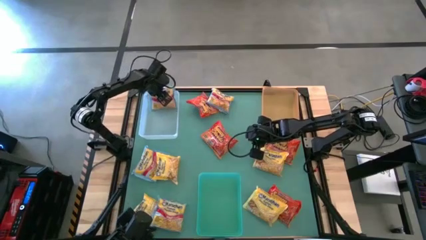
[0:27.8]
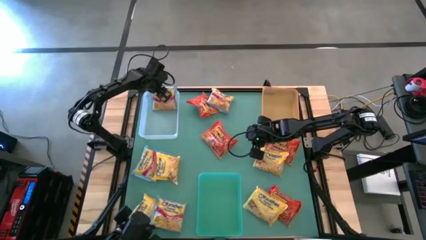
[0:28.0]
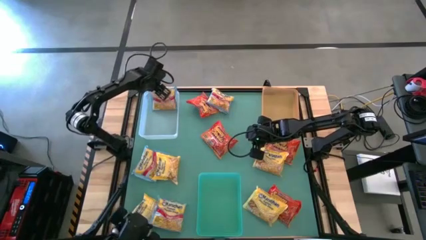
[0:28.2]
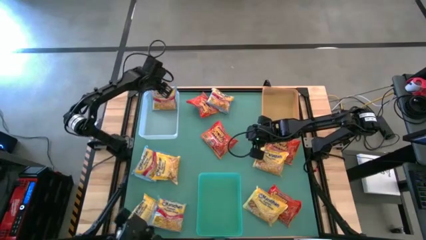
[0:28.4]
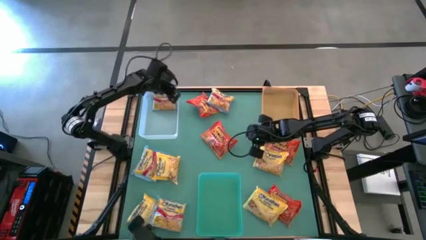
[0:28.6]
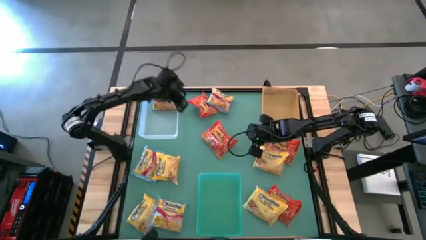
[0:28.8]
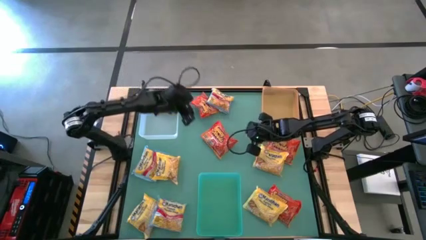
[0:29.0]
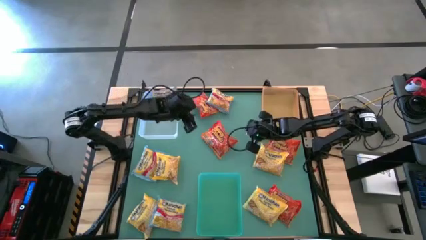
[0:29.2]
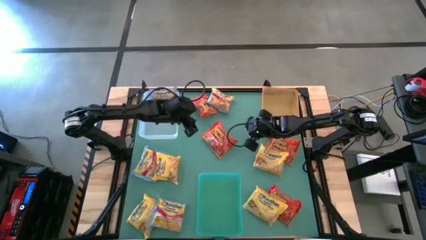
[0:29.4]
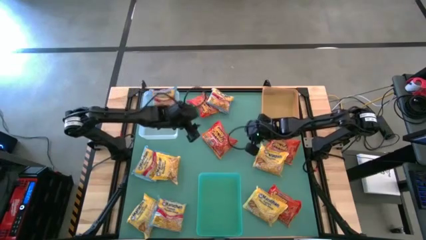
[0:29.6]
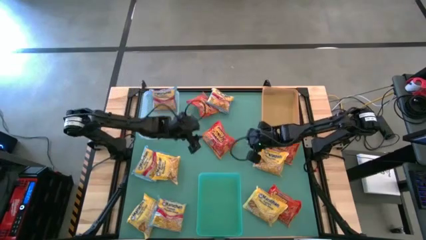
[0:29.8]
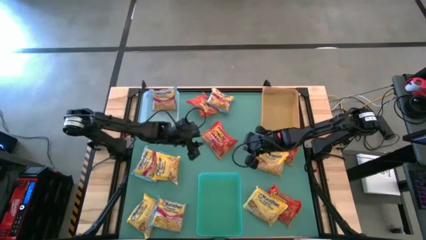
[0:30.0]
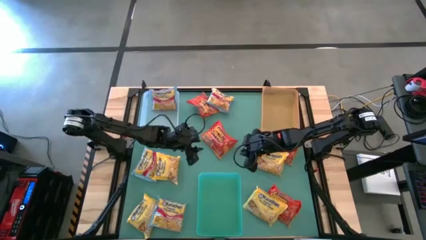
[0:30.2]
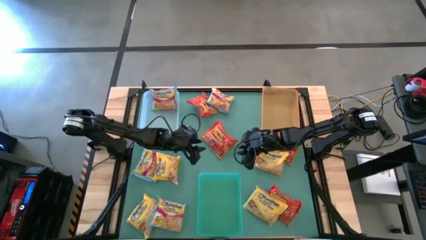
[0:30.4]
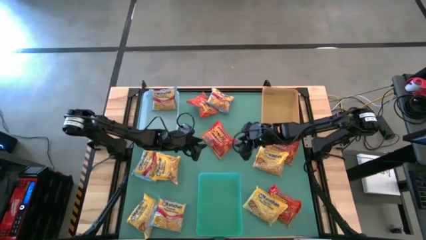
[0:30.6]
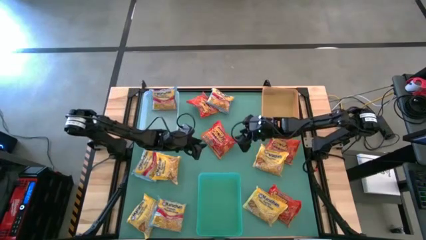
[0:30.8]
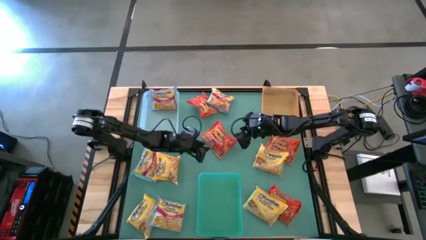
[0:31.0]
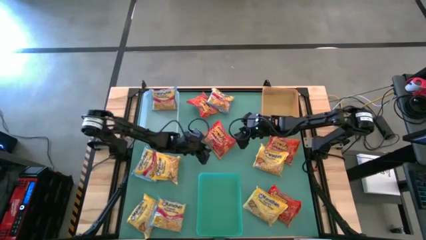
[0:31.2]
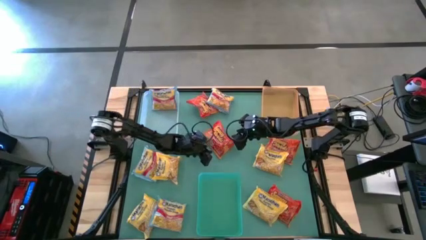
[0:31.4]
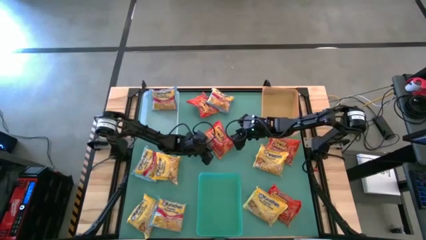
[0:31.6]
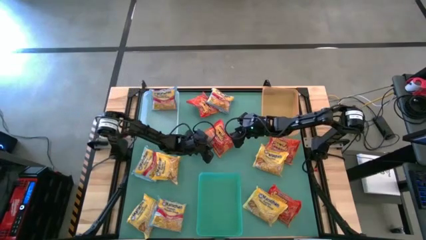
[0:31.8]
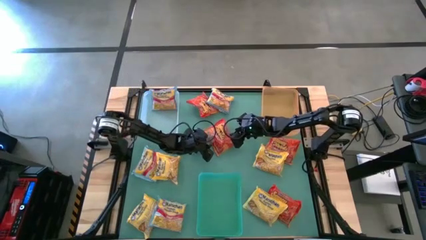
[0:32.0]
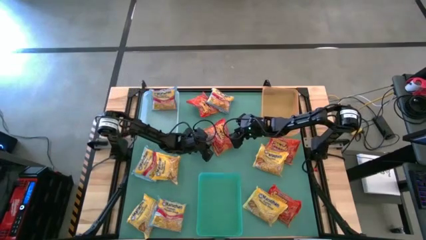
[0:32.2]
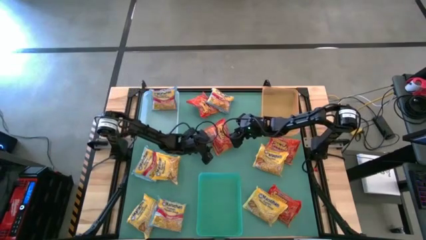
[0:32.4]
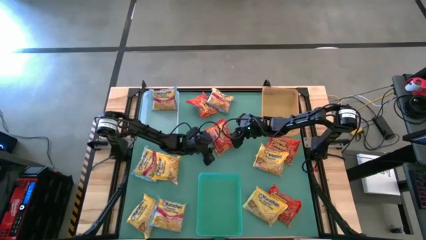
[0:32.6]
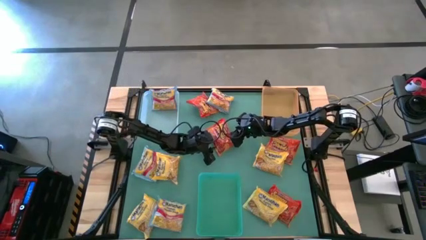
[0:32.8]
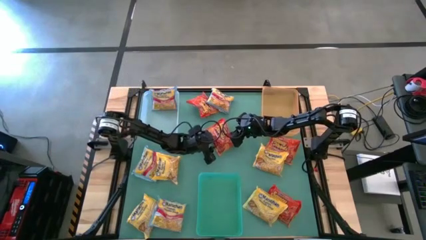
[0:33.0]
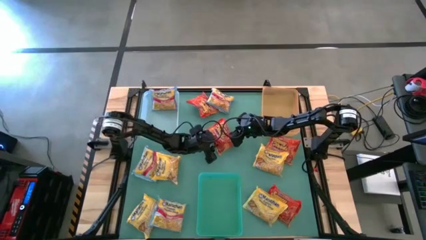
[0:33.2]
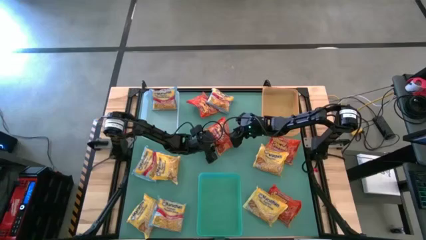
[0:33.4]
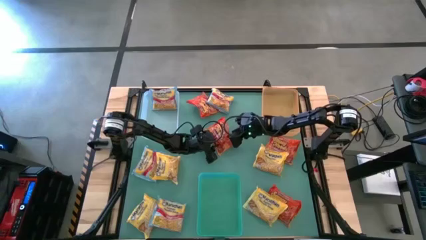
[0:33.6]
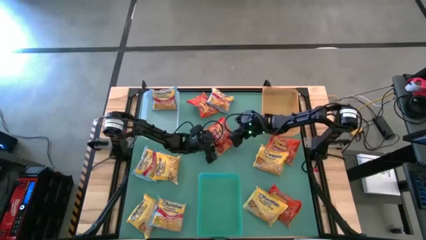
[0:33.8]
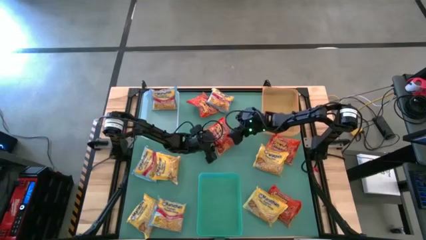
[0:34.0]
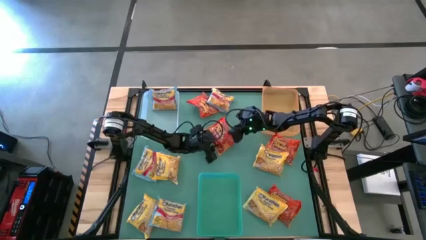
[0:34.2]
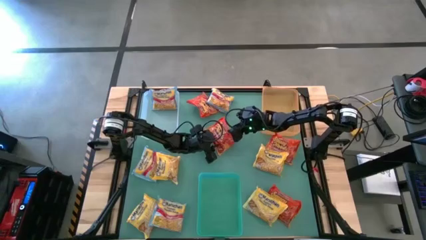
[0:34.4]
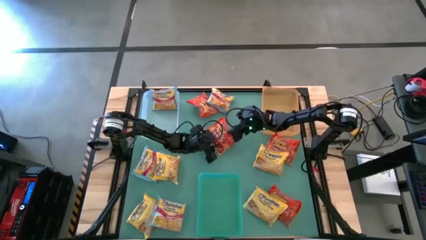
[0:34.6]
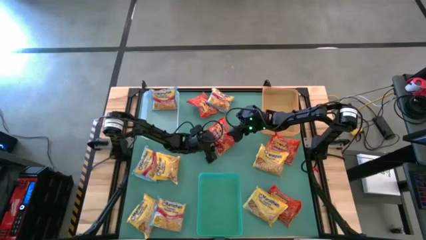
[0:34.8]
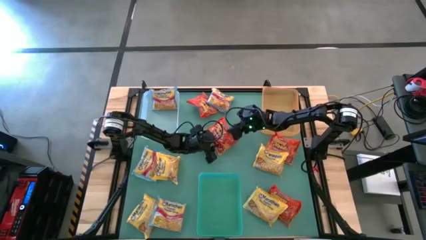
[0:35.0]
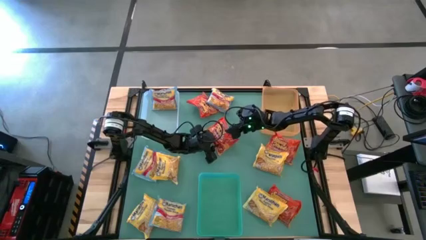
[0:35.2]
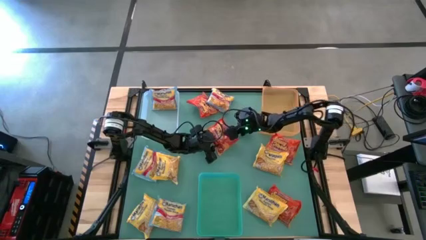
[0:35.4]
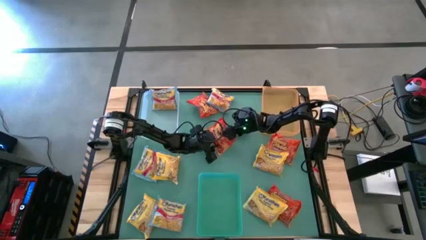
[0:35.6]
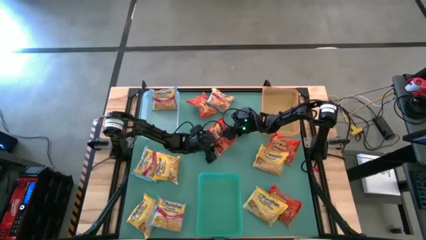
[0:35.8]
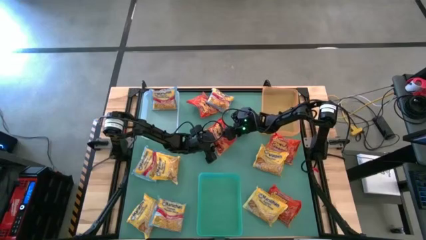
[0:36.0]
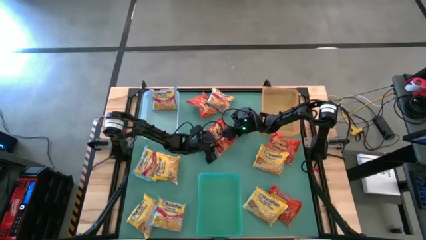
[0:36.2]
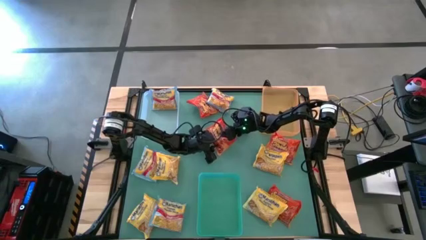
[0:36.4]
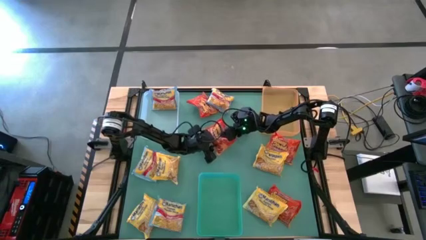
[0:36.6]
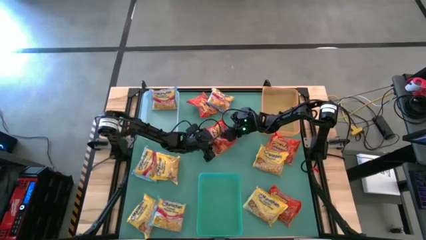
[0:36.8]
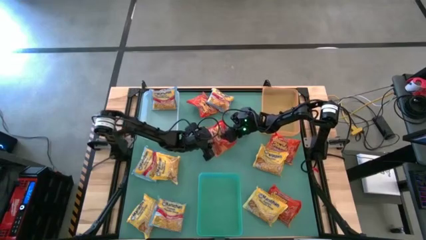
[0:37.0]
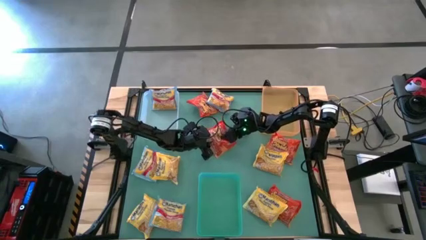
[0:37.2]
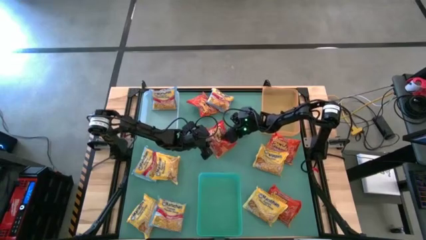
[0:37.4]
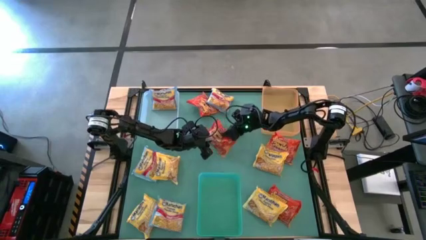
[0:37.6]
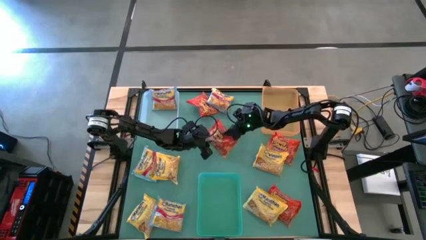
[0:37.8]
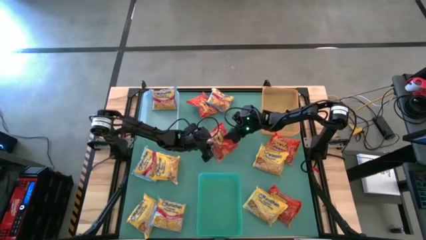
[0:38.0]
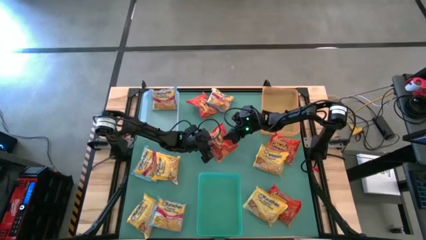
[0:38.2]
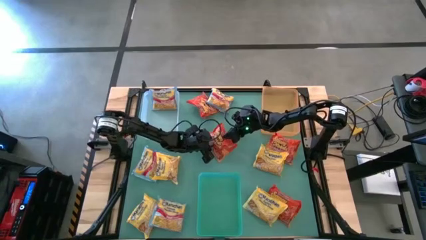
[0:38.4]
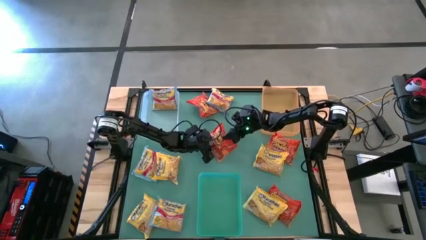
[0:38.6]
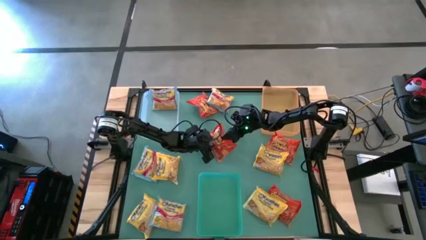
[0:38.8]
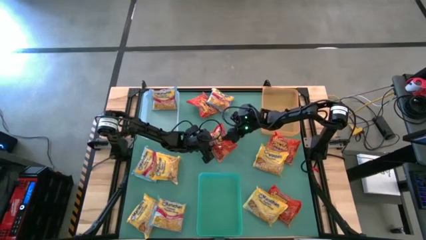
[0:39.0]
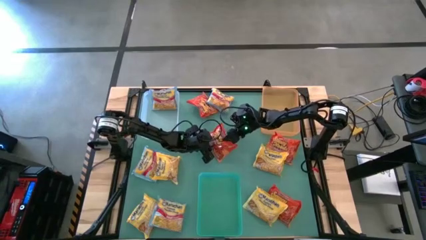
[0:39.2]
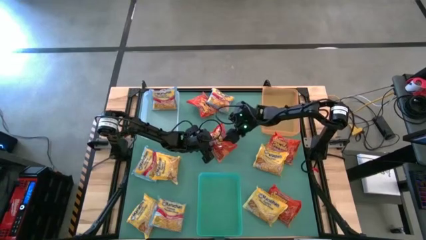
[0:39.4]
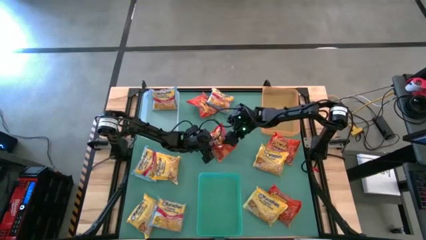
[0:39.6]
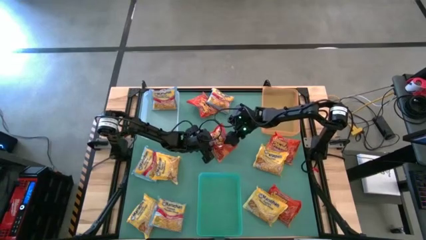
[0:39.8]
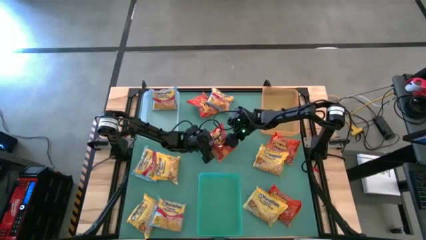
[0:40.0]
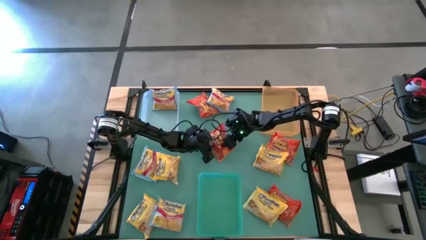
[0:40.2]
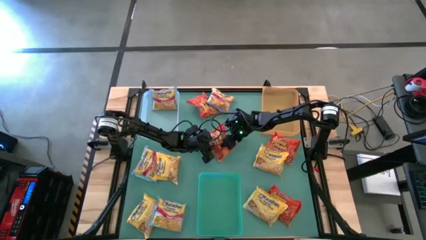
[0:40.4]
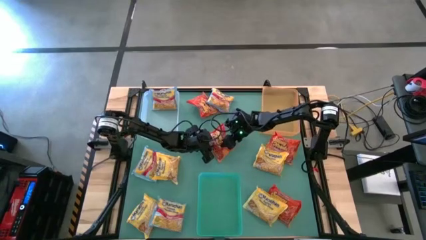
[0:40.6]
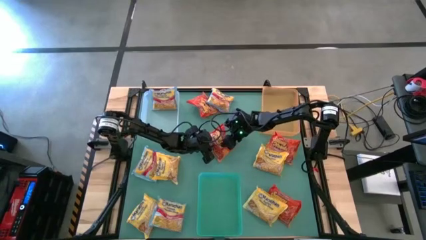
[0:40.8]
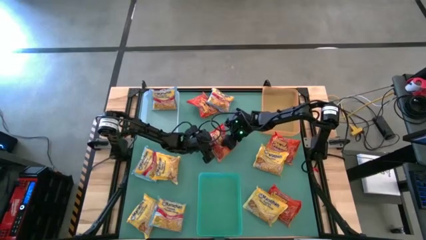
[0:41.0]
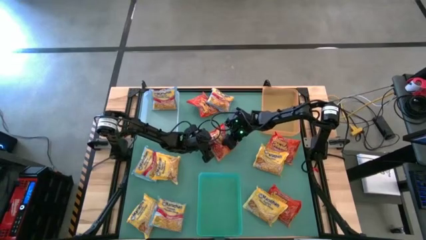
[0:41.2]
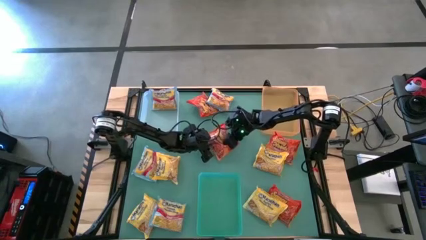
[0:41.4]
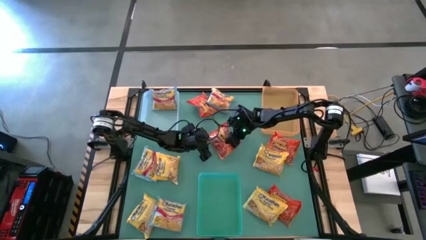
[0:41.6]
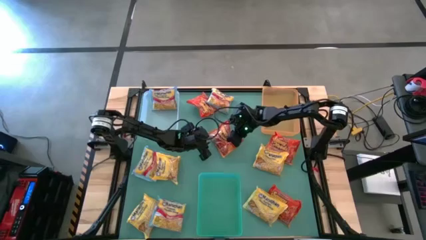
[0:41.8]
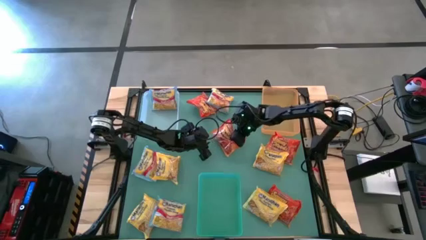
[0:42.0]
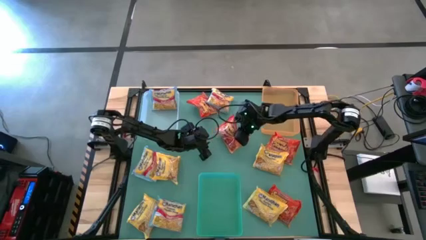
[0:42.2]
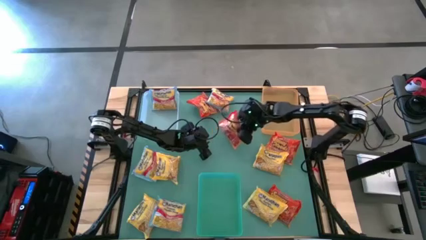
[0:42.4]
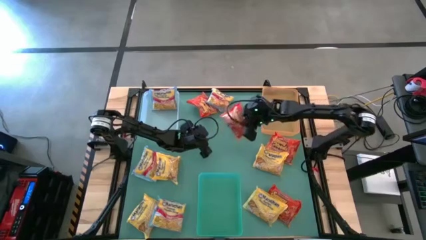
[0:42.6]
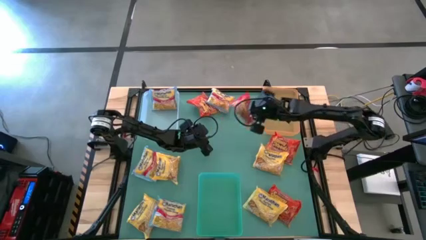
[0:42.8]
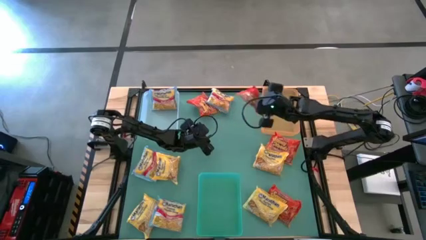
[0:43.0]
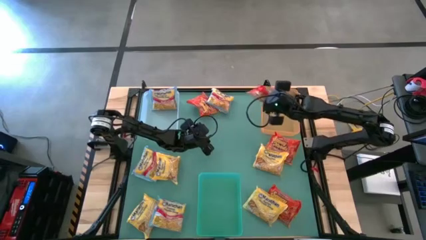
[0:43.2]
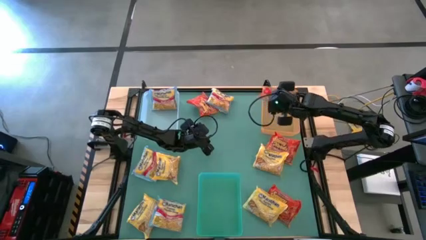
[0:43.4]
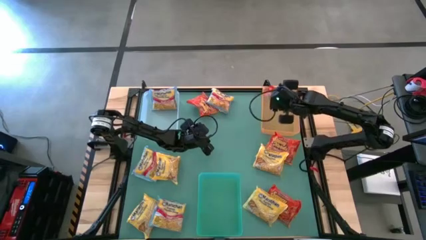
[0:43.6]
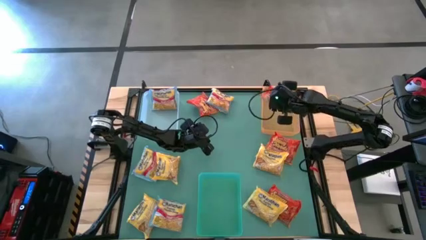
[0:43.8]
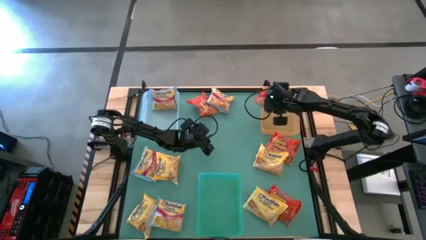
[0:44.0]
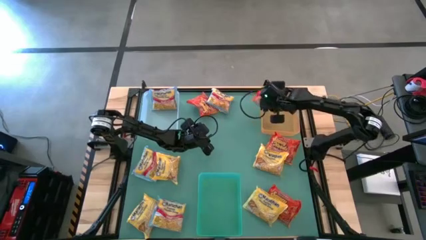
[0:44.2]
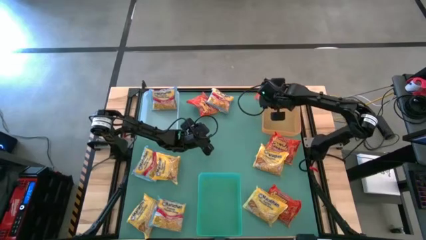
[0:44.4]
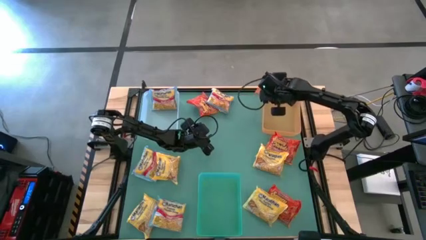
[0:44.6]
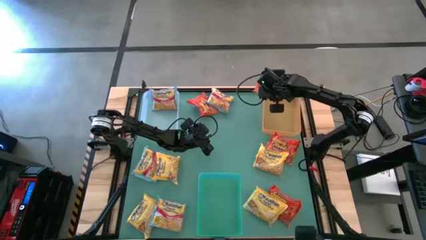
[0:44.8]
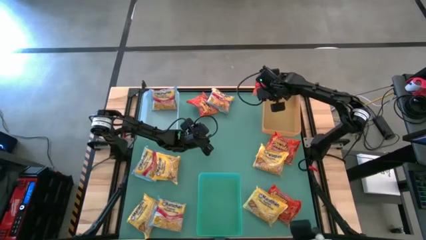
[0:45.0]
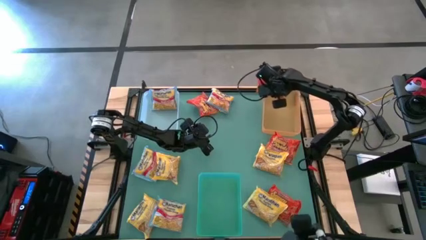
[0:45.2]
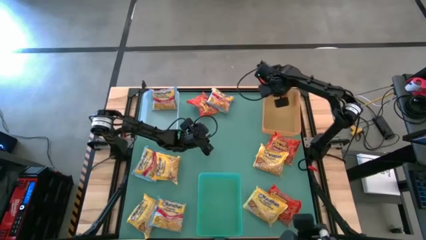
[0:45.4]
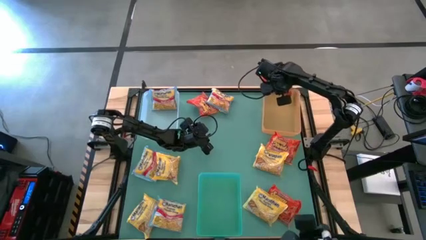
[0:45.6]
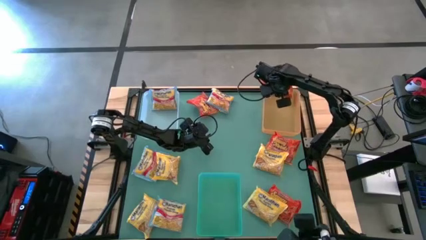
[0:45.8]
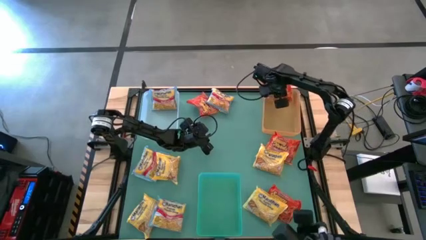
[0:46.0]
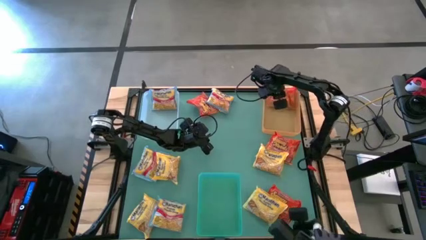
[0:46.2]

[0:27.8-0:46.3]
Task: Sort Maruchan noodles
Put the red noodle pack into the orange bin
